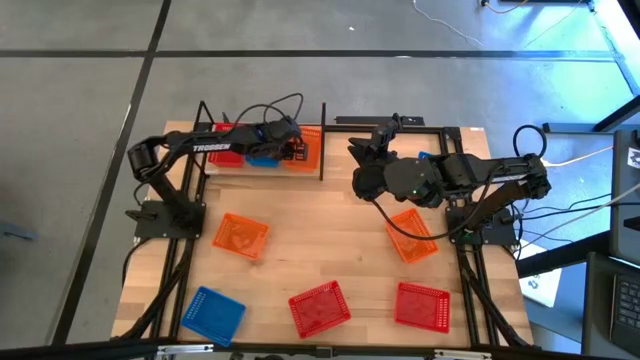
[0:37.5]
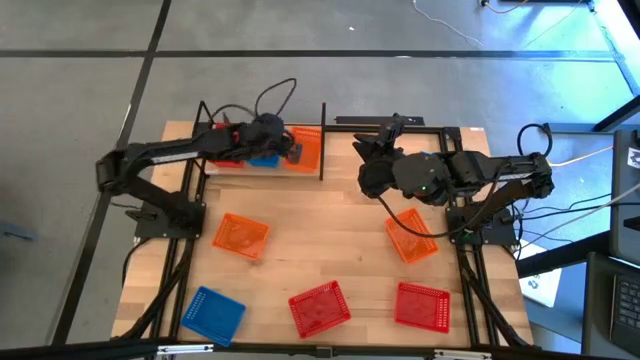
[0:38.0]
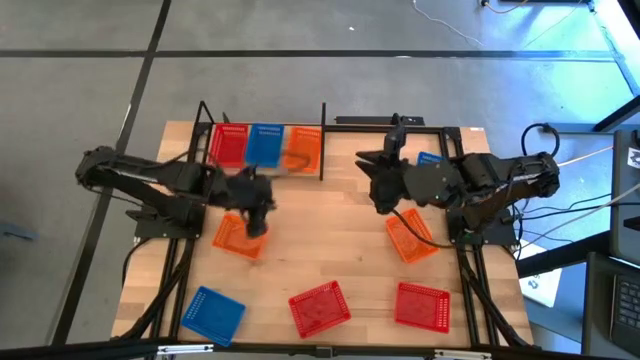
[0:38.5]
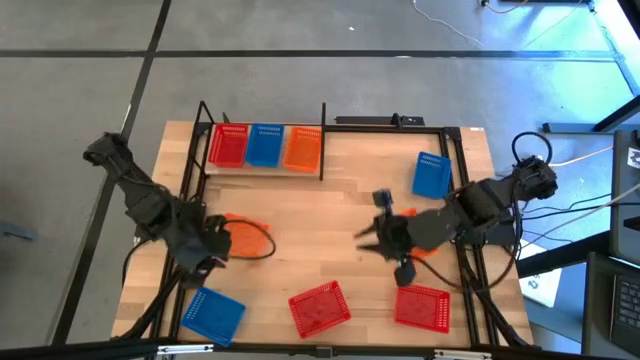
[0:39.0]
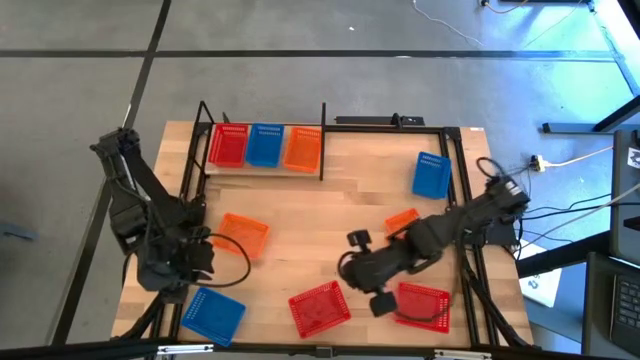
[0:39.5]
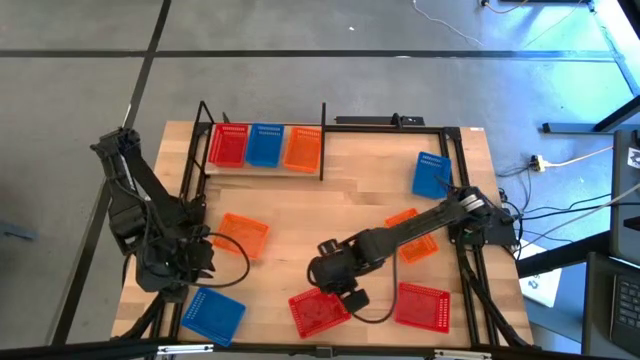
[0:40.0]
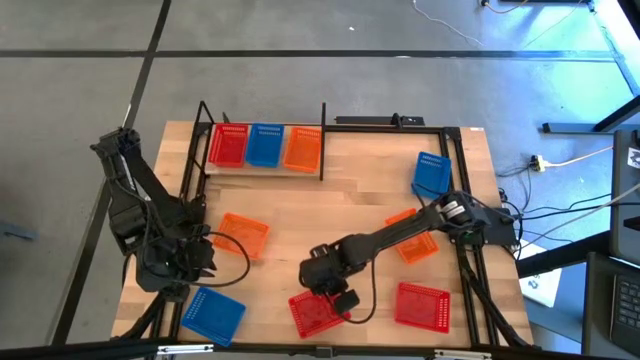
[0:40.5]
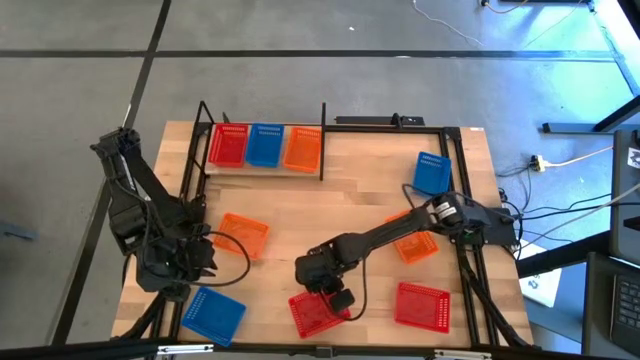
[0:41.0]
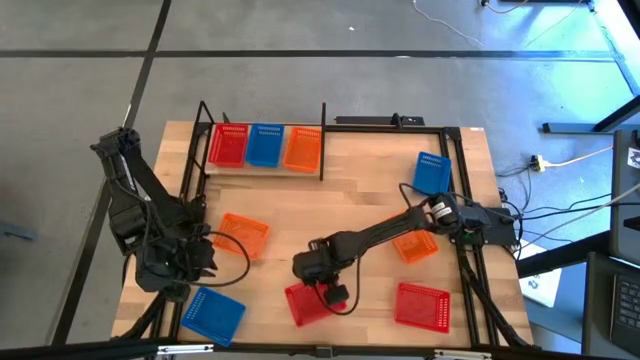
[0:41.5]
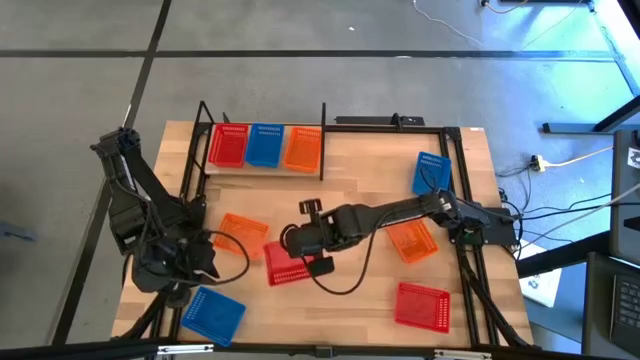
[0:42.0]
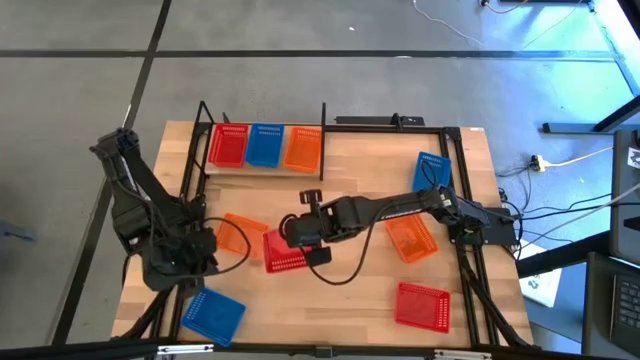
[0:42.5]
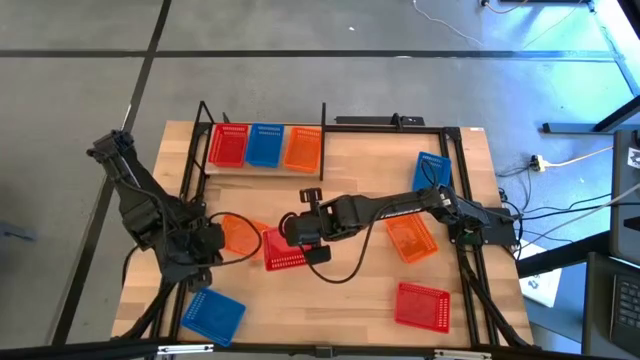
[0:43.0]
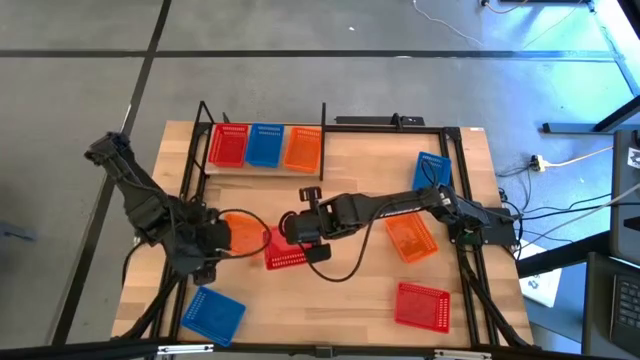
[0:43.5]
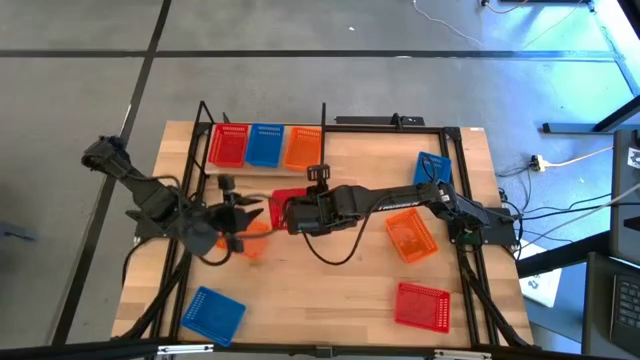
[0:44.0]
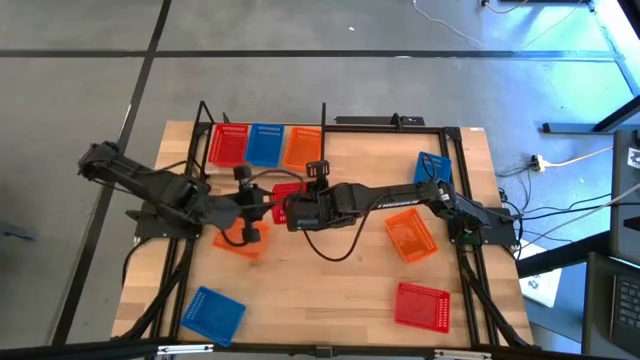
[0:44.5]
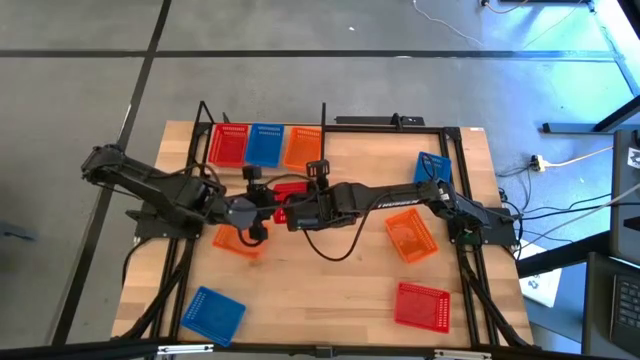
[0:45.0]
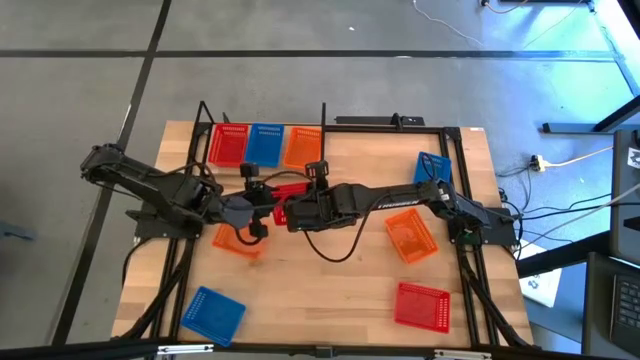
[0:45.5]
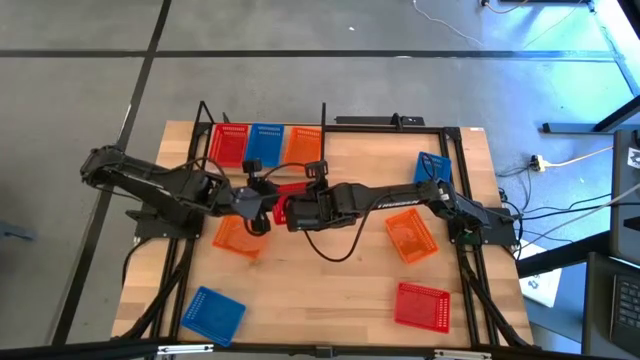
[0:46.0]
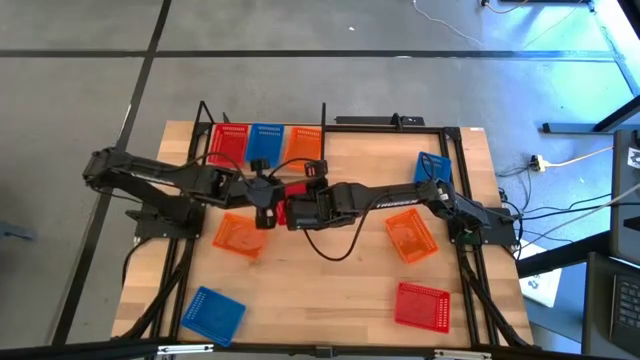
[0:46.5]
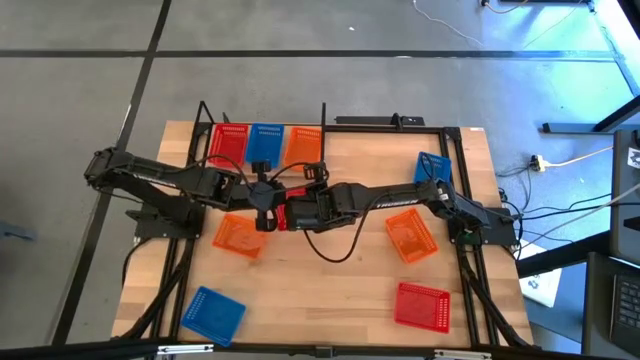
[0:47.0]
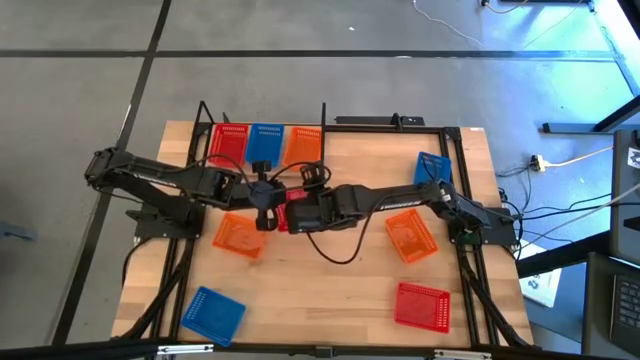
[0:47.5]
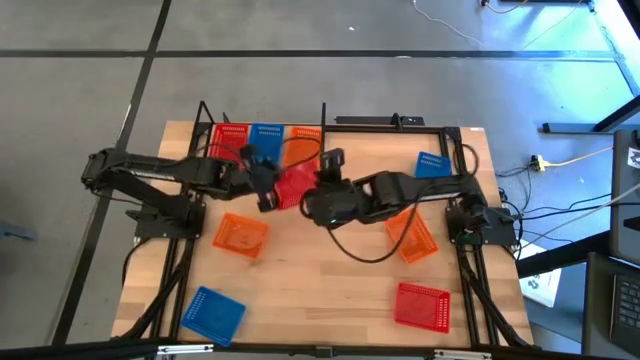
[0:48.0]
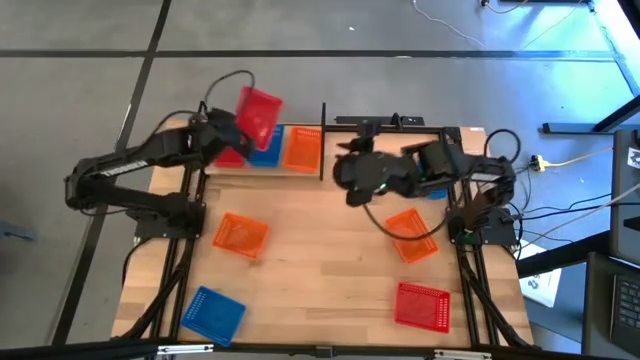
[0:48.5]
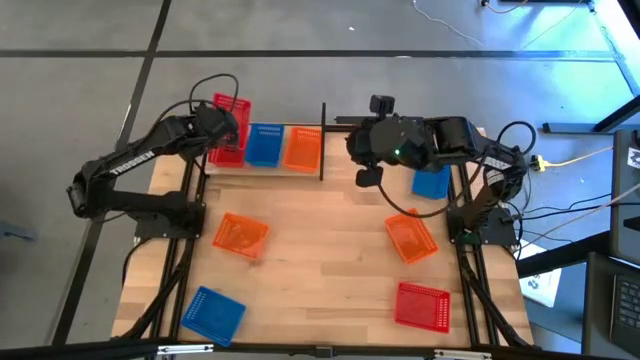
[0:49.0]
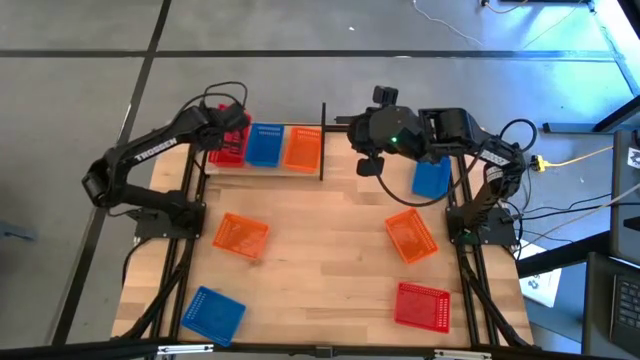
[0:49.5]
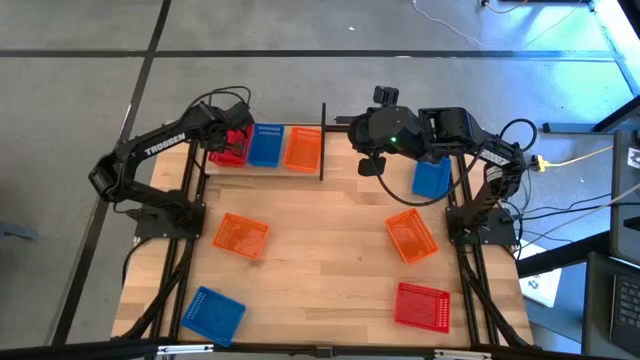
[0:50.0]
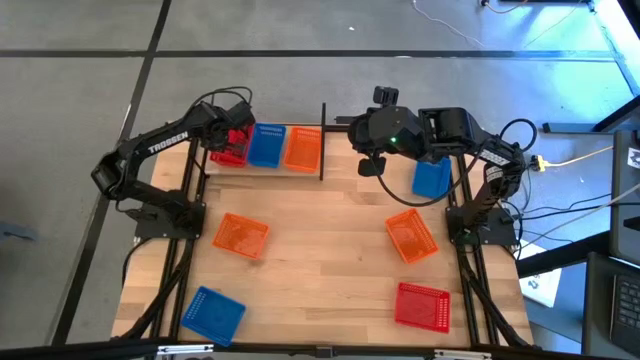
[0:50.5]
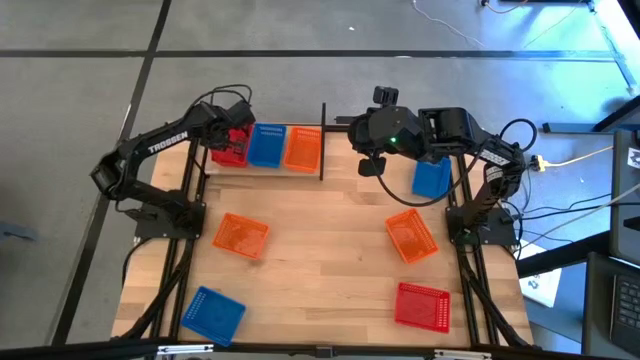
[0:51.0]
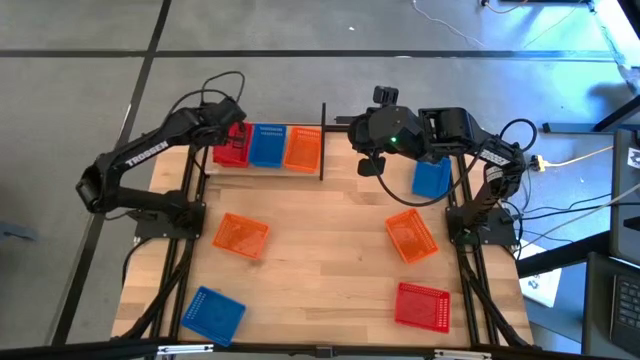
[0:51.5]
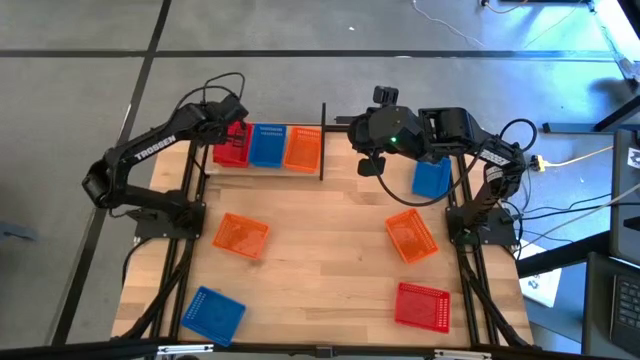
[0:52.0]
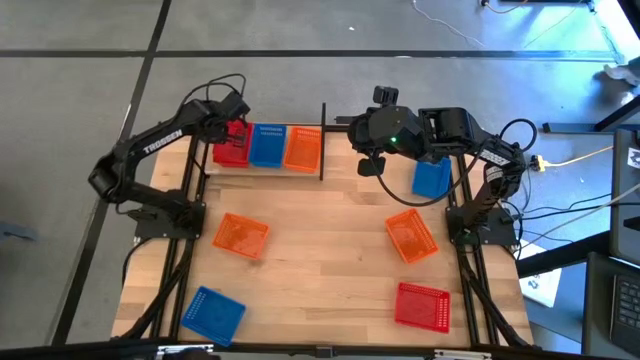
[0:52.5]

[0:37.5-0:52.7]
Task: Stack baskets on shelf by color
Stack the left red bin on the red bin on the shelf

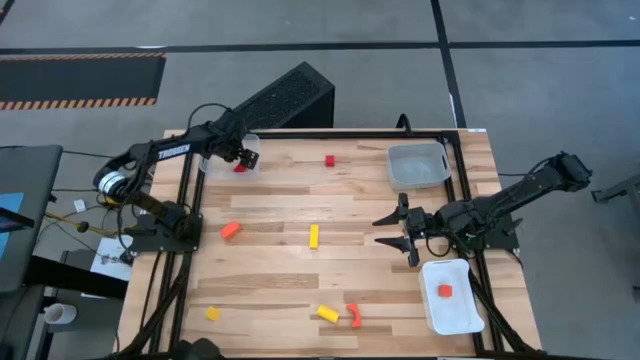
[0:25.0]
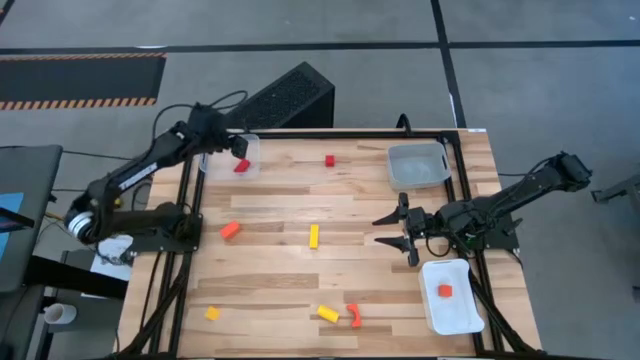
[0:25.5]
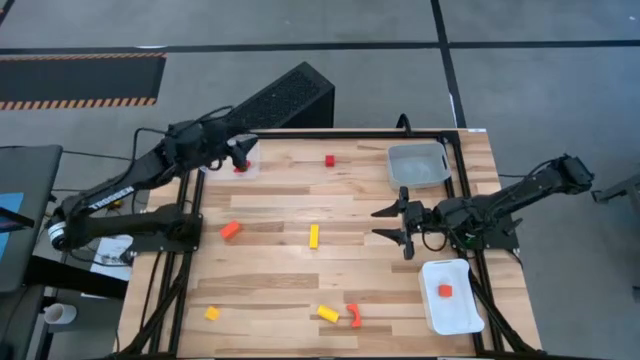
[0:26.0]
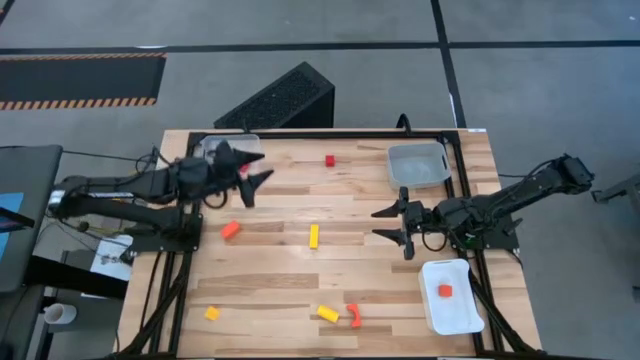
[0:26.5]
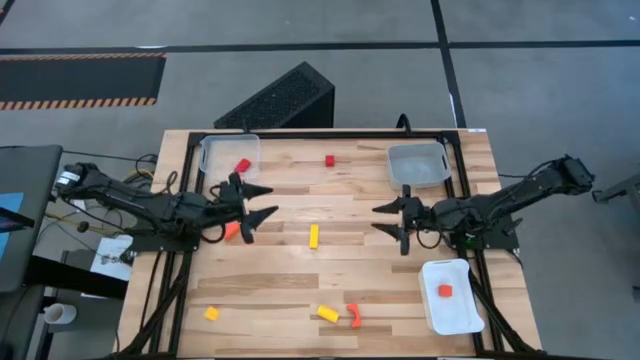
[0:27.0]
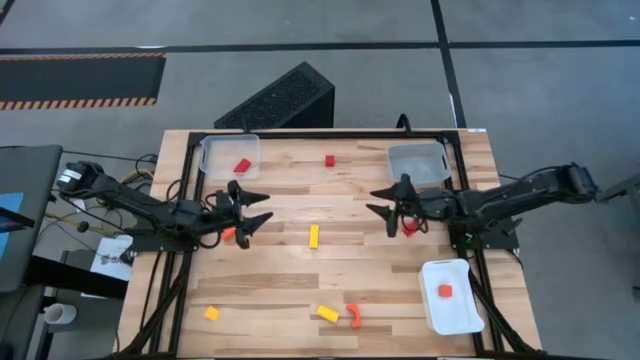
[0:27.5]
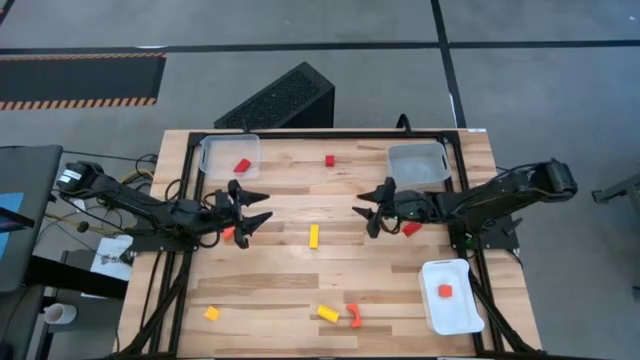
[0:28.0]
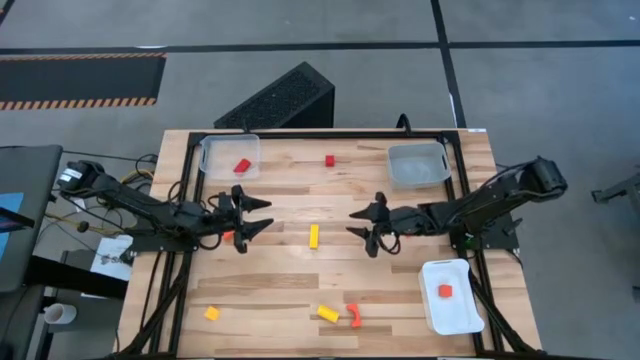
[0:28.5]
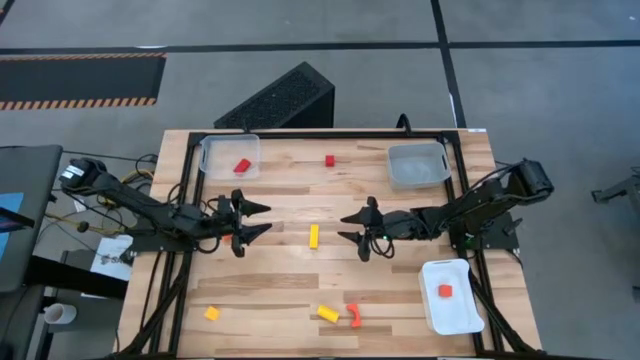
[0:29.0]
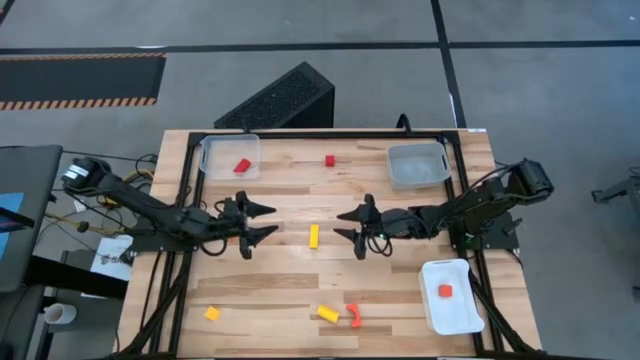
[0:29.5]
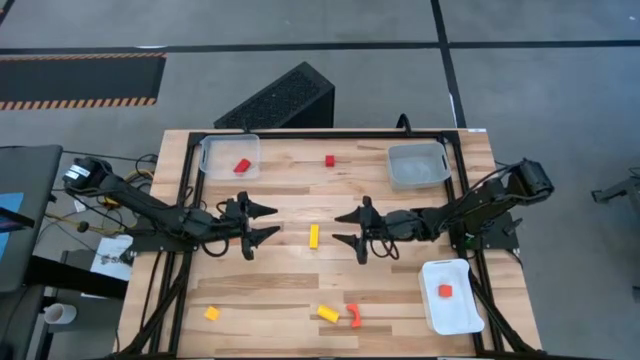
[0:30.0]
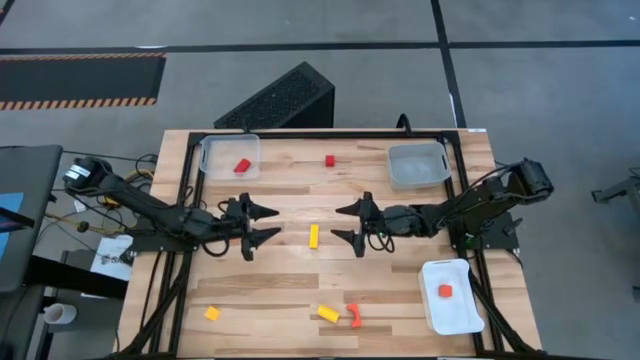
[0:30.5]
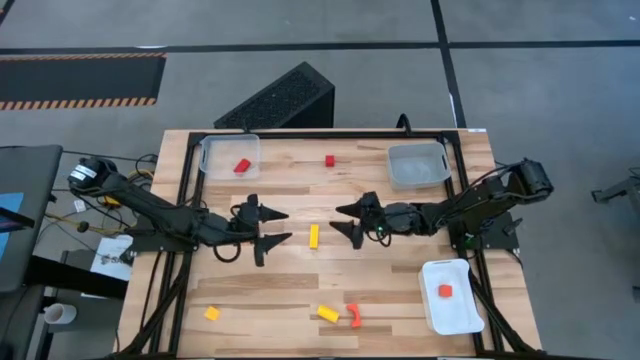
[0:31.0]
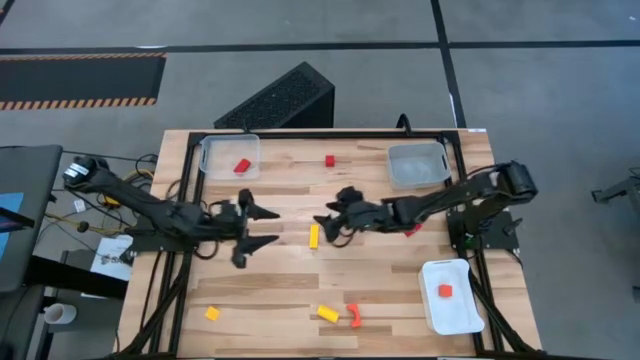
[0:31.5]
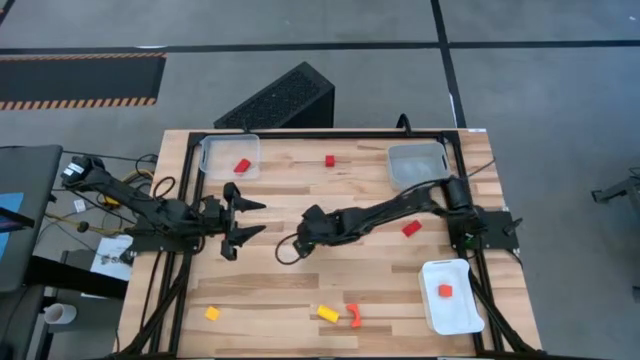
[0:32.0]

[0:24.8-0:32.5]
Task: Sort & place blocks by color
Put the top right yellow block into the gray bin
